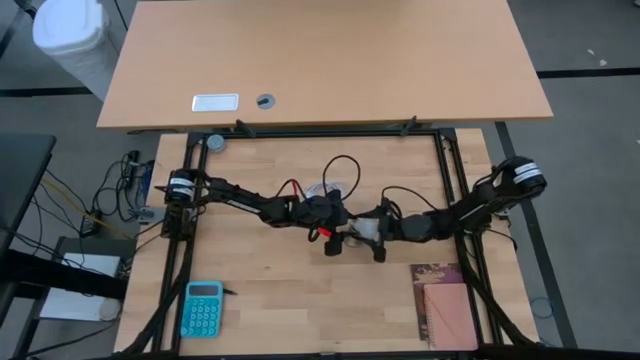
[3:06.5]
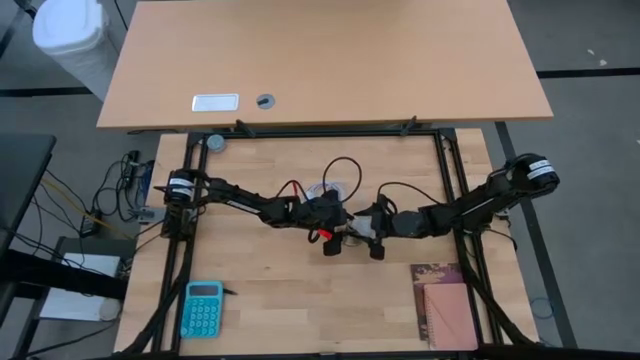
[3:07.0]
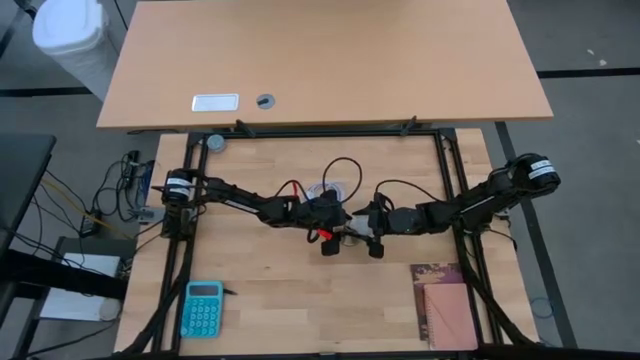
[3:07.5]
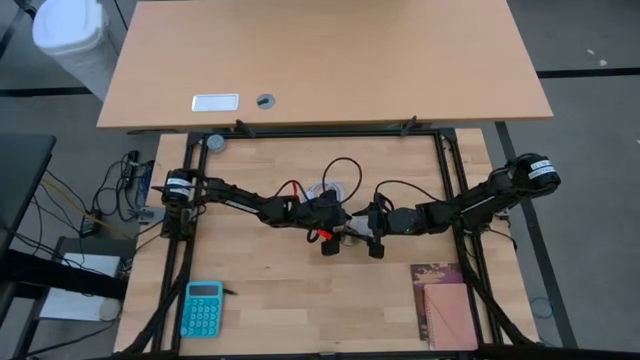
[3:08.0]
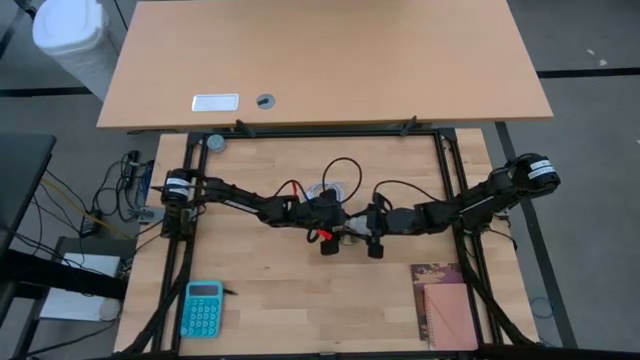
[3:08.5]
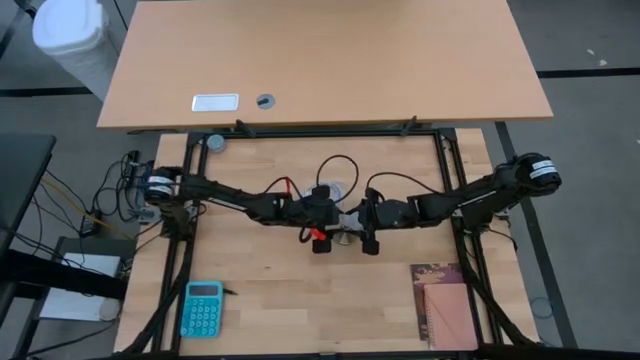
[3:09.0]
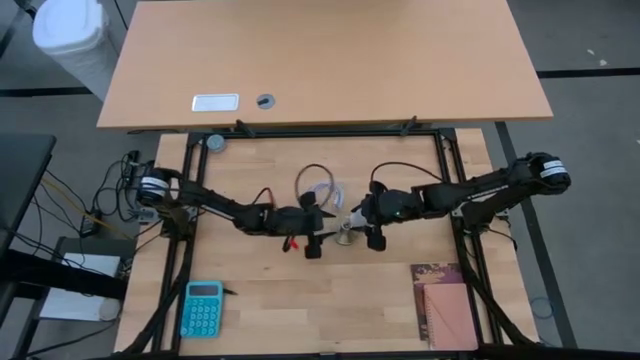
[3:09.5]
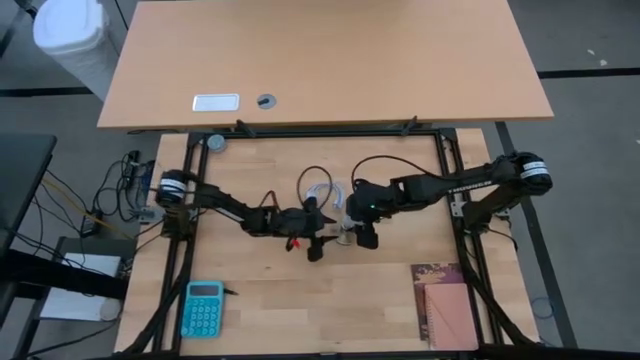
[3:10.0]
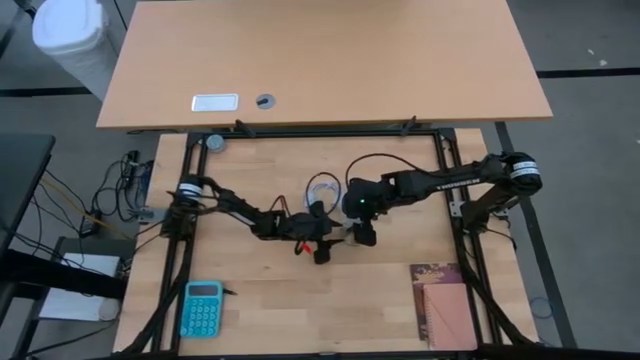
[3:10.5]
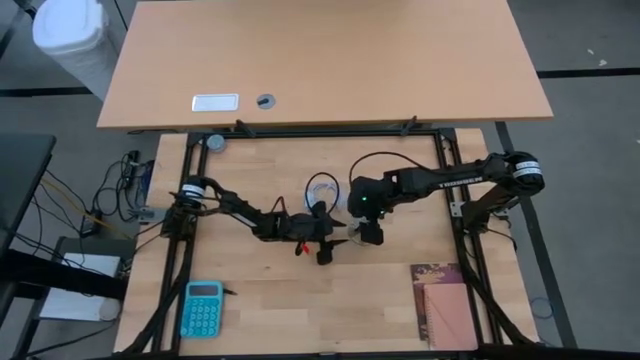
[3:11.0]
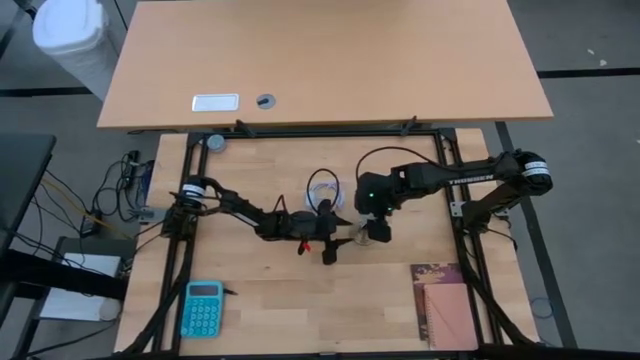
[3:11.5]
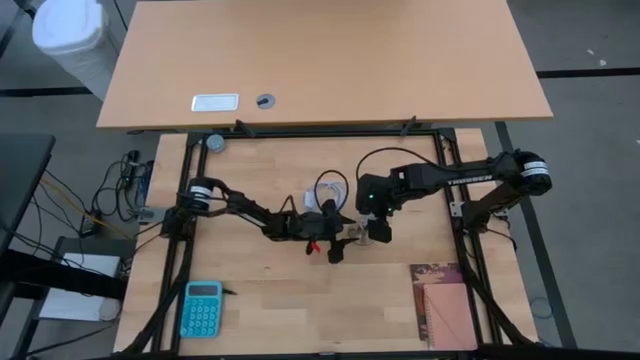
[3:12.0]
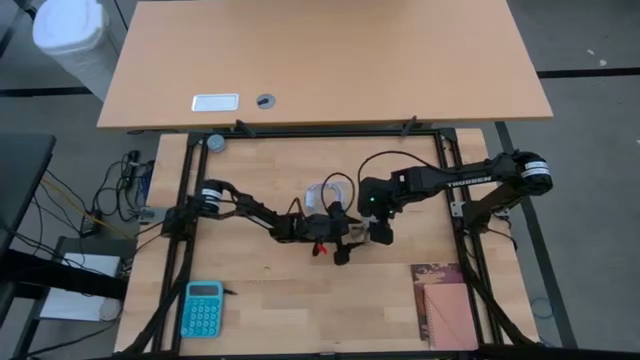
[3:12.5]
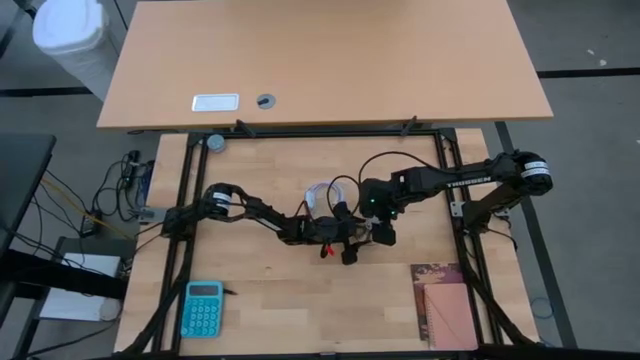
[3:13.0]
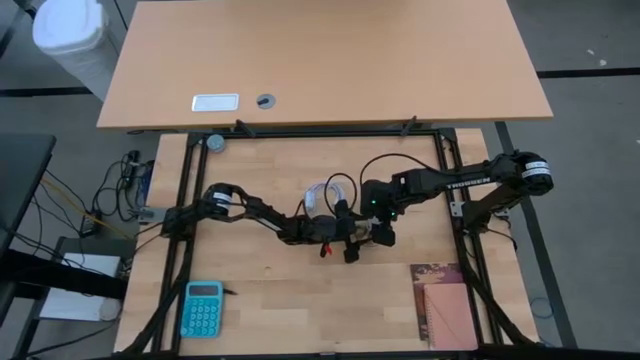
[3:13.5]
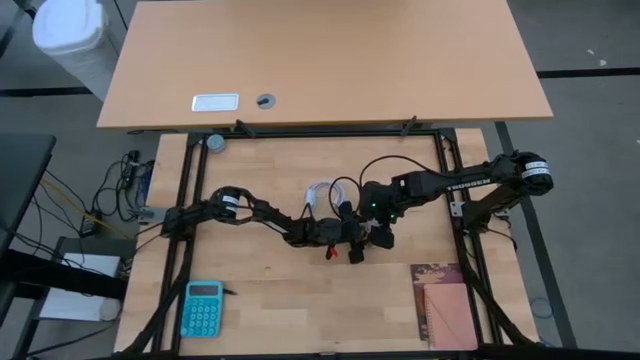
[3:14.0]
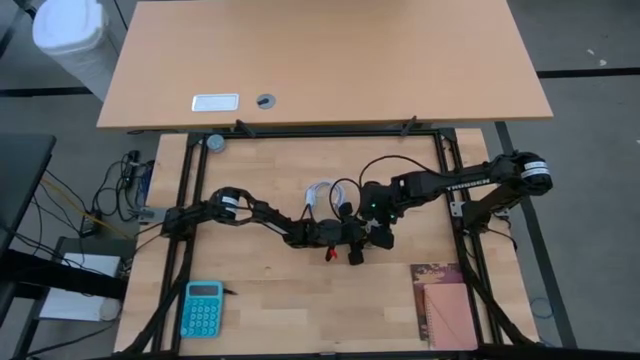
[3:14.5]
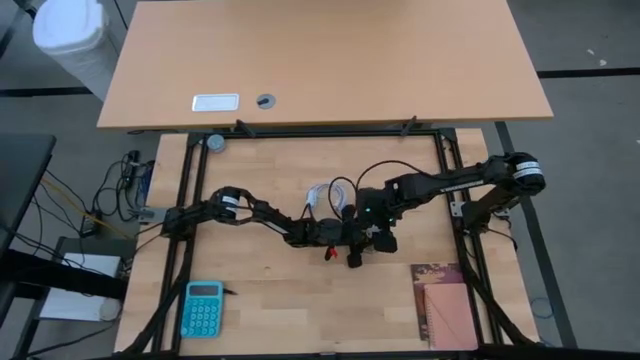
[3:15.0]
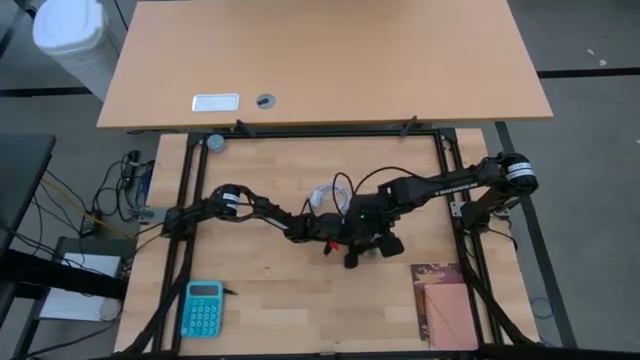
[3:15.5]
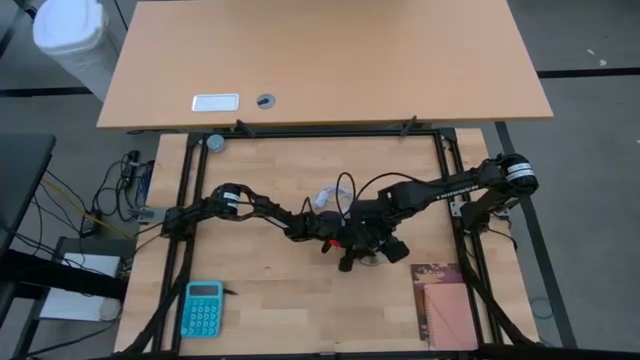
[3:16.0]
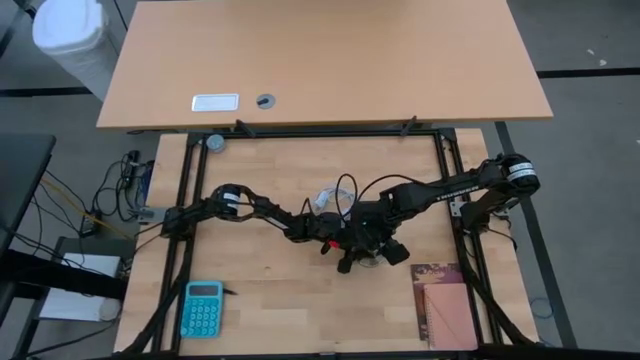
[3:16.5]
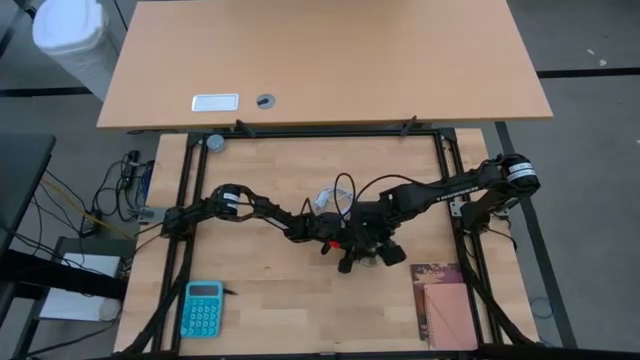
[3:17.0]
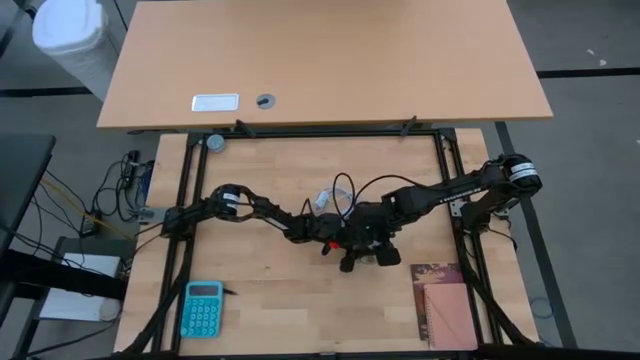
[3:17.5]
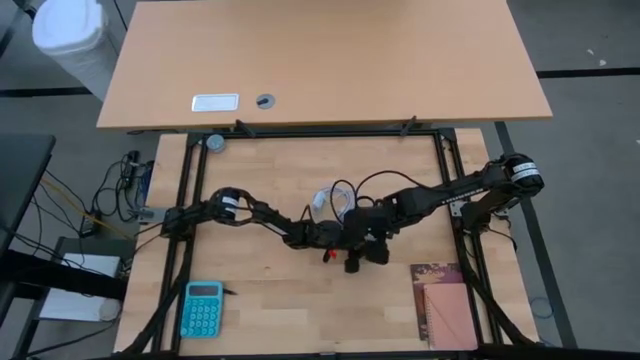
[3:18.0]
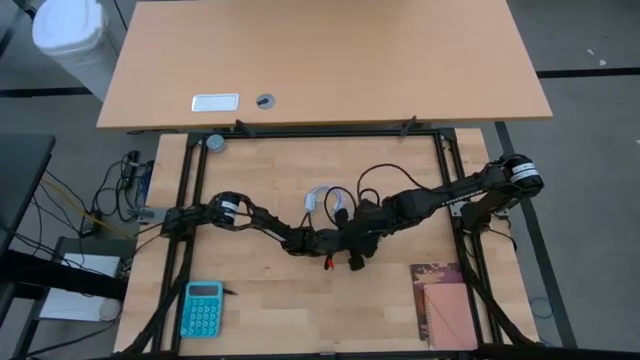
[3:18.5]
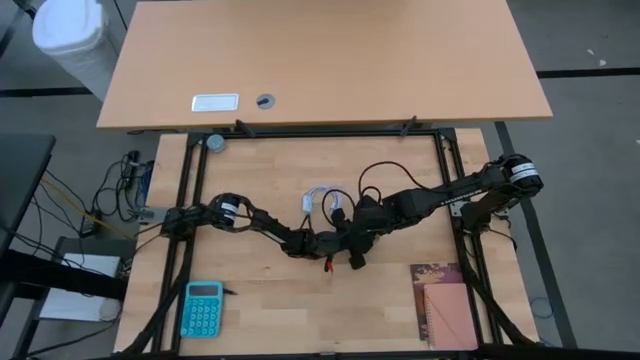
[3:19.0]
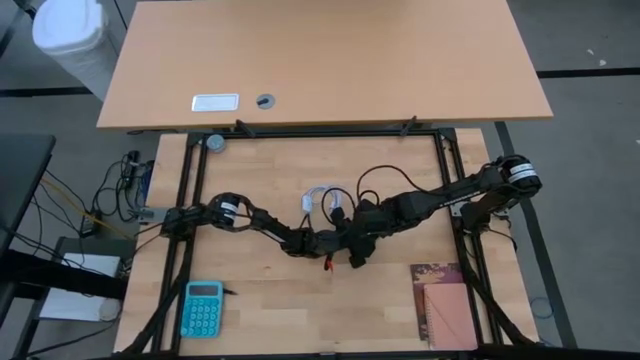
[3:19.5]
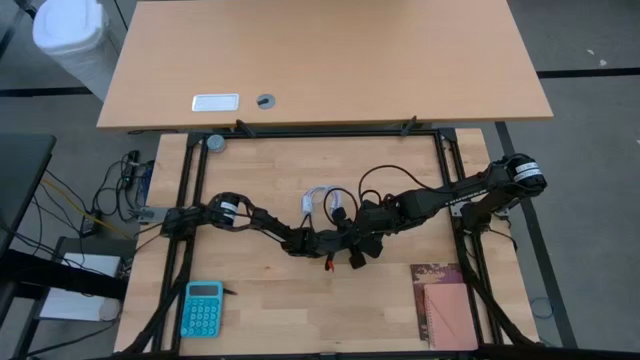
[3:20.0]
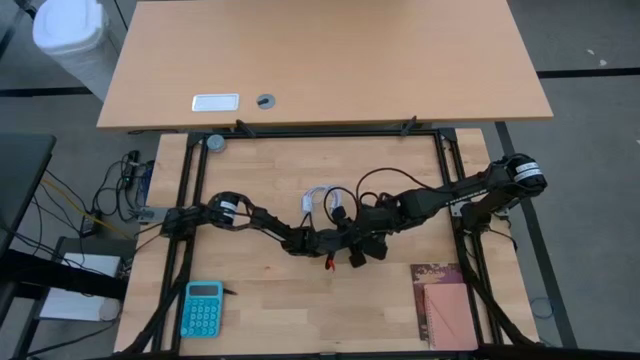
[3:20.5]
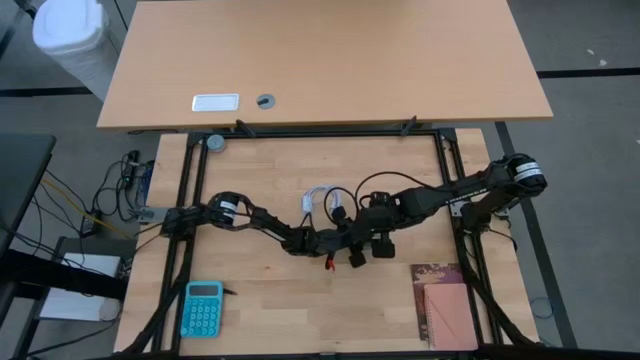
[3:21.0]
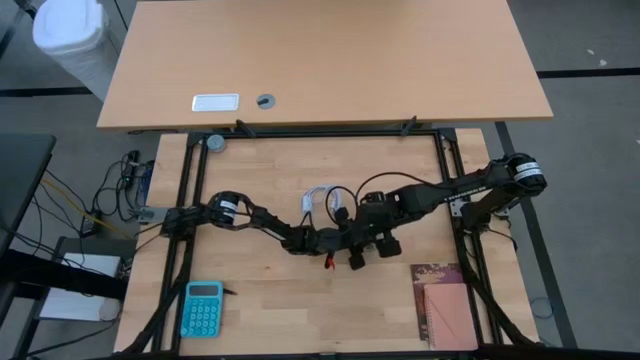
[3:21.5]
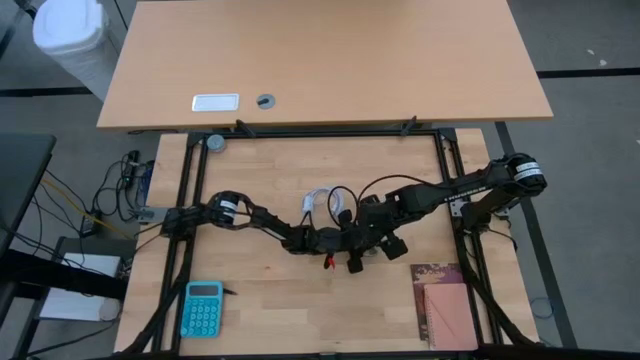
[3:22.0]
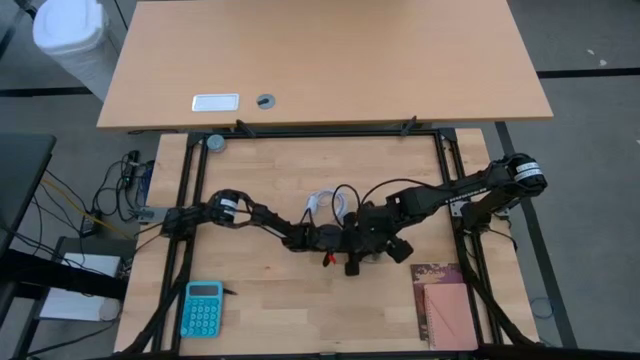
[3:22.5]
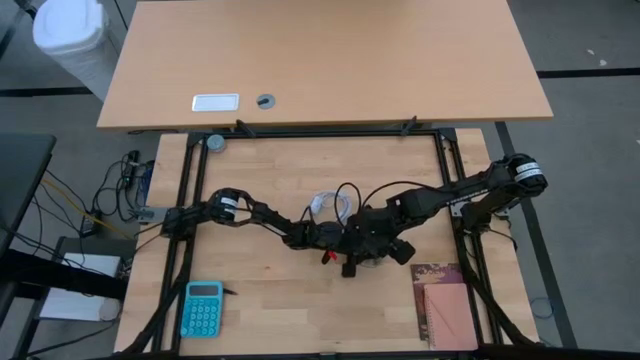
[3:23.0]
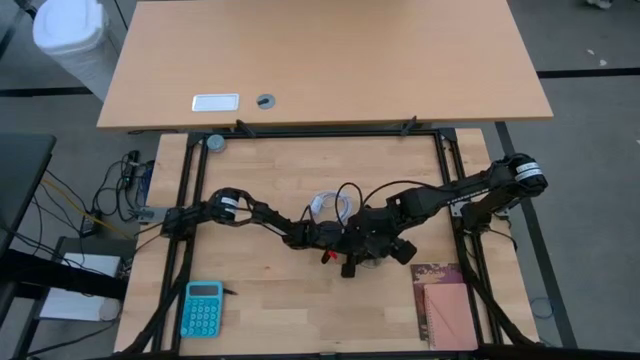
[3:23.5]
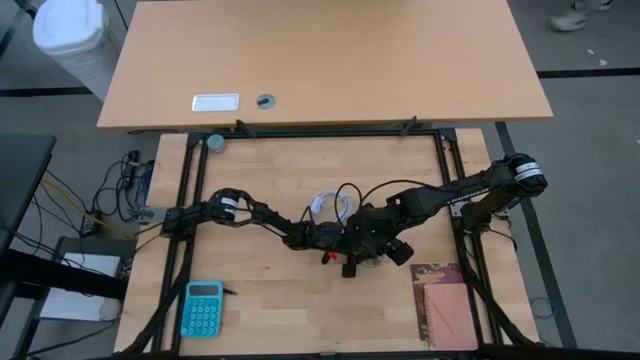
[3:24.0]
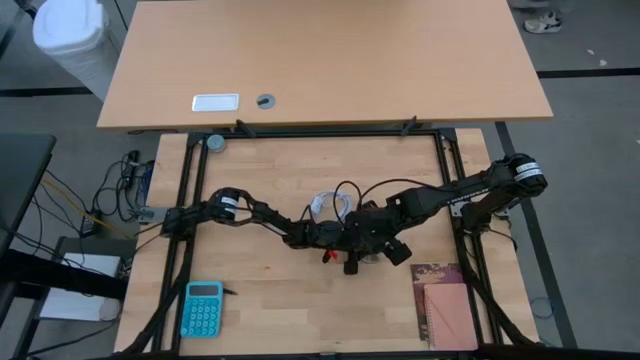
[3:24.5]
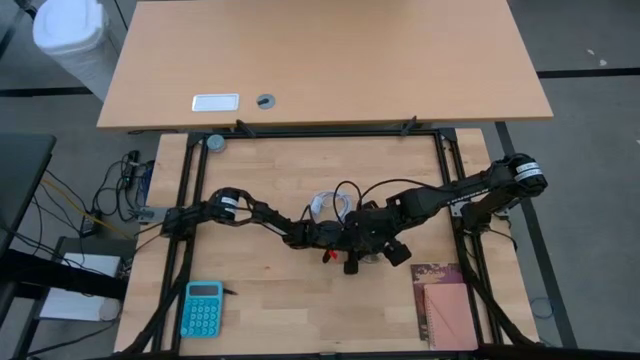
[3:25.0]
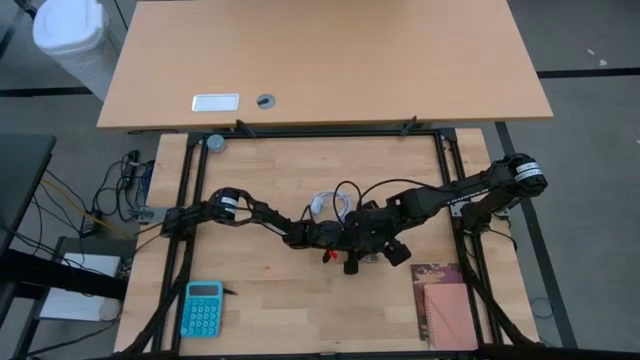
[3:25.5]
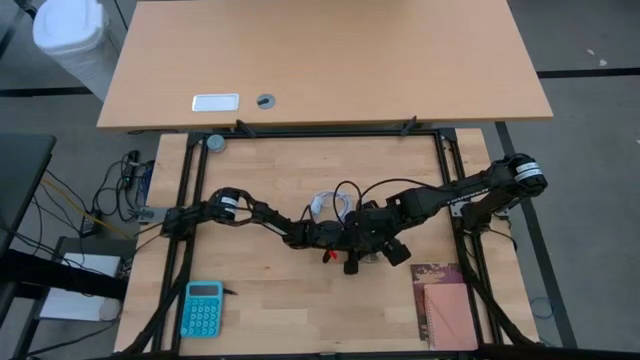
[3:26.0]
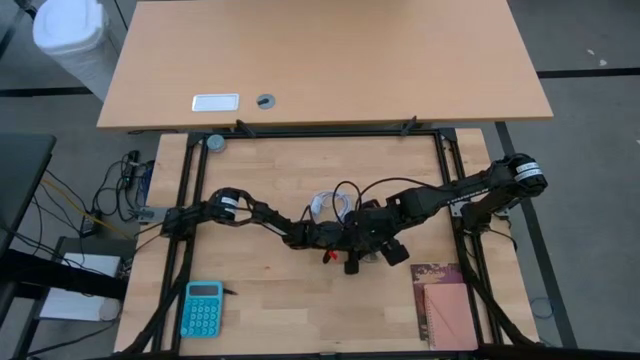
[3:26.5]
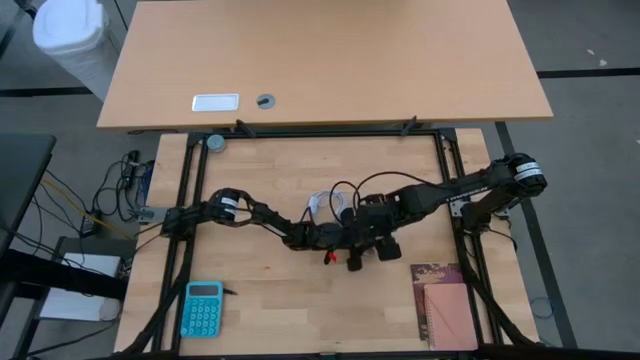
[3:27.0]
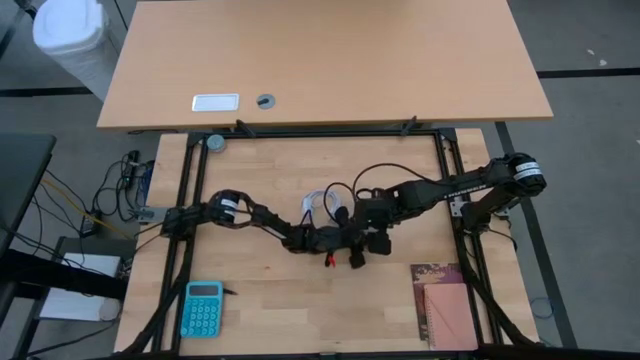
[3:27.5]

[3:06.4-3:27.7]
Task: Screw lightbulb
Insert the white lightbulb into the lamp socket
